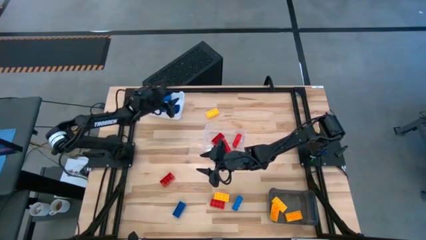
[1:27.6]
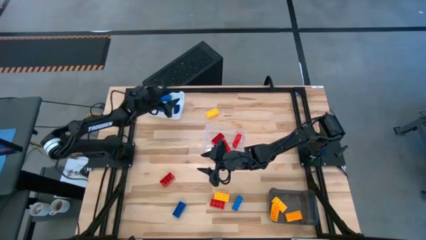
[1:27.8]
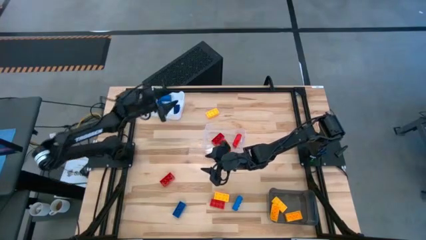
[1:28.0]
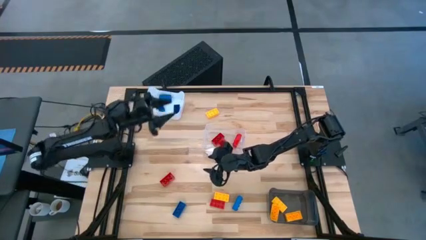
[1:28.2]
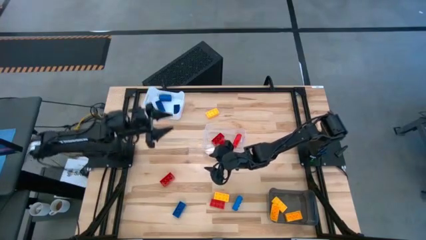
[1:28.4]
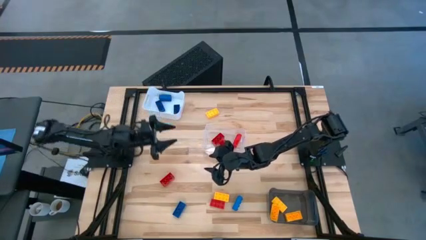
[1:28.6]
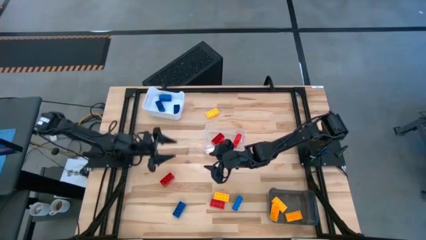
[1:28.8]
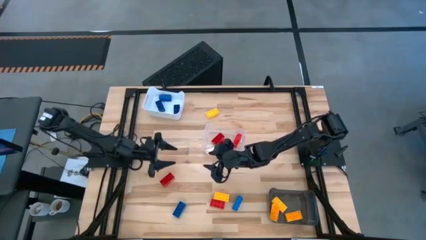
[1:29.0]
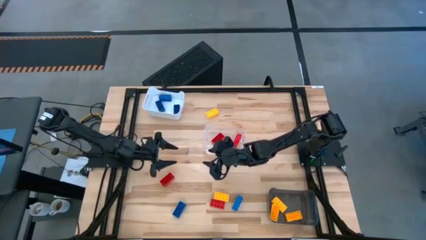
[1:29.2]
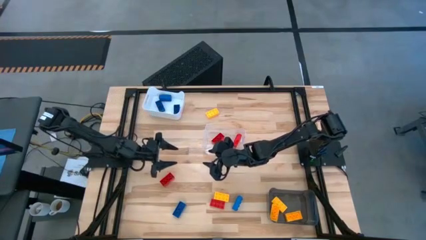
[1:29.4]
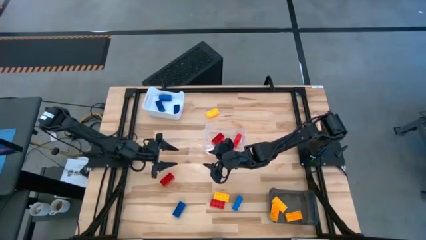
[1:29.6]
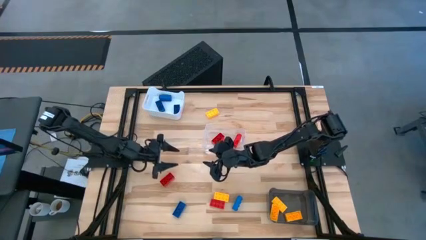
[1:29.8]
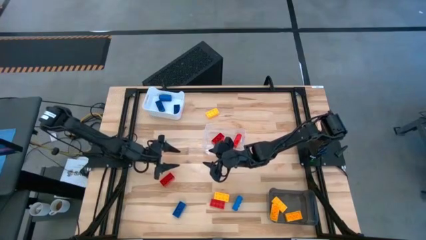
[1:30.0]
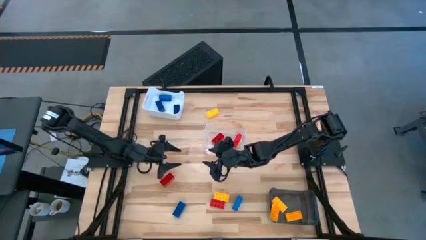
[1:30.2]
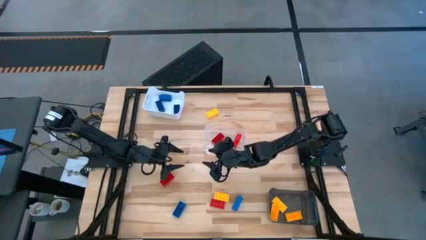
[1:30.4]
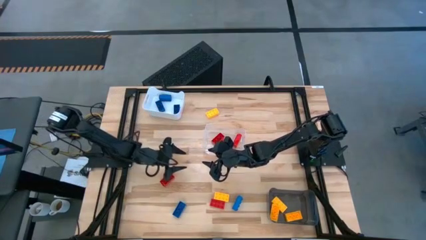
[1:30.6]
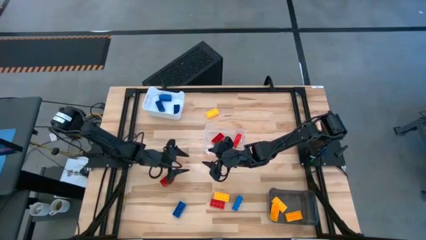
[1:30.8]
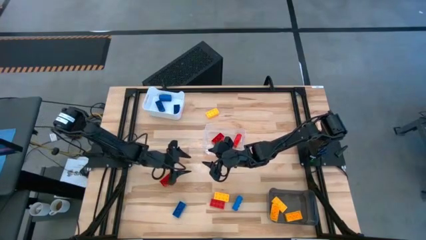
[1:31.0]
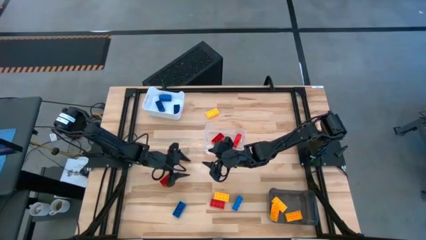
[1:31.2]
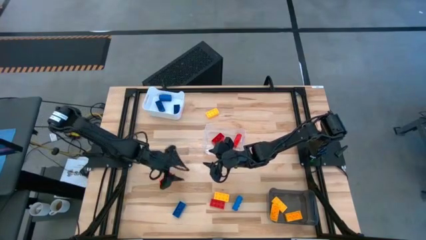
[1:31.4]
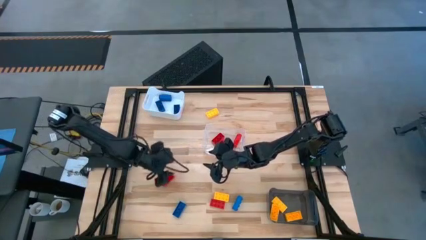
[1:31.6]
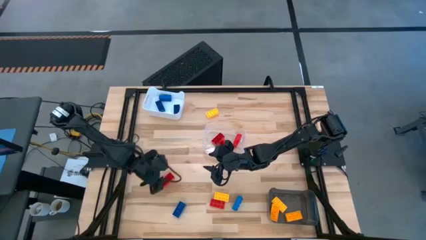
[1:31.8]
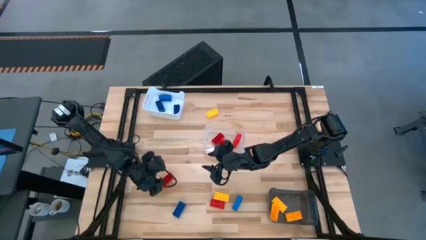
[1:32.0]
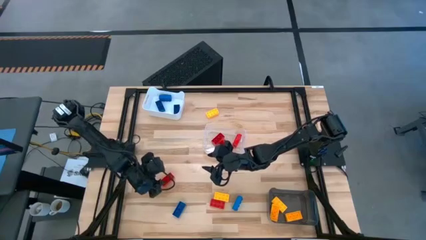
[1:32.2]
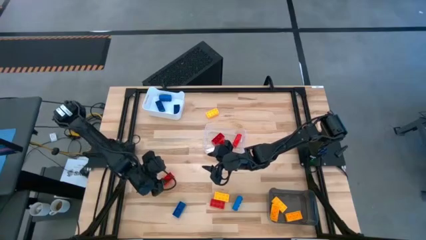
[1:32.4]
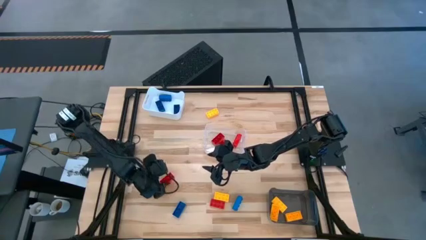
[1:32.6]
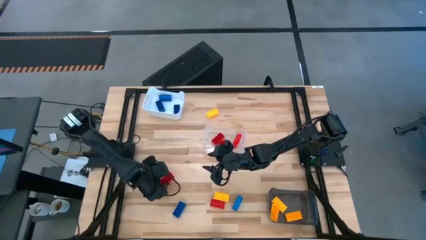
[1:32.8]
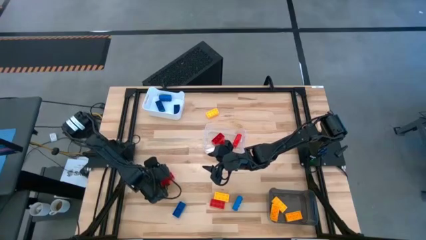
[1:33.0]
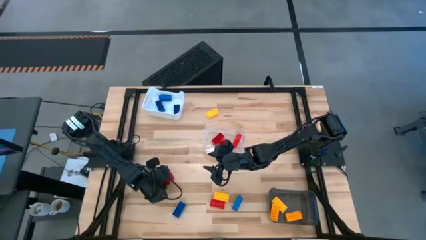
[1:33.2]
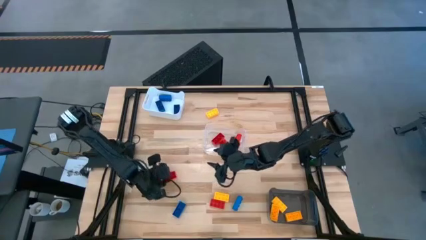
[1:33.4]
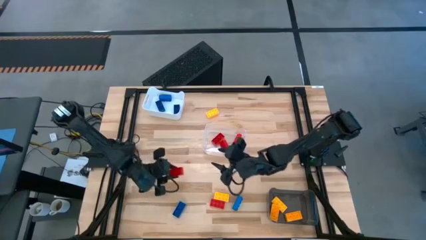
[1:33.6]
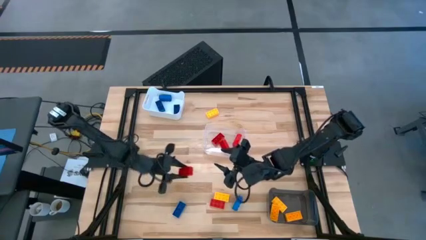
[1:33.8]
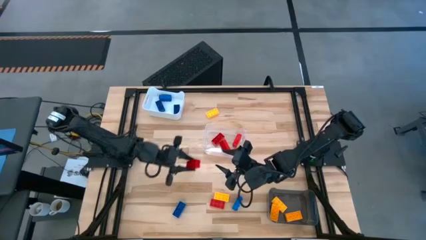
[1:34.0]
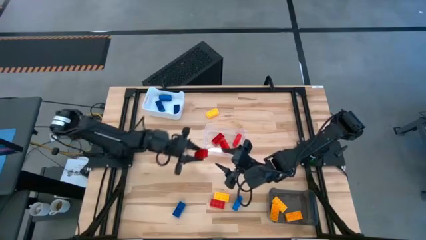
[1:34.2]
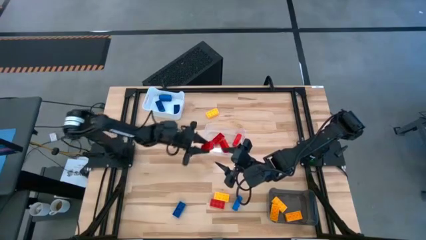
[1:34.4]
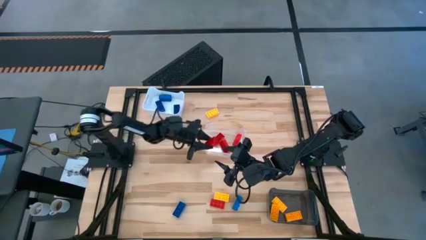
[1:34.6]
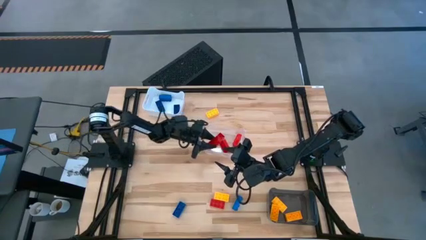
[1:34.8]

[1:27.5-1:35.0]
Task: Sort & place blocks by color
Put the red game piece into the transparent bin

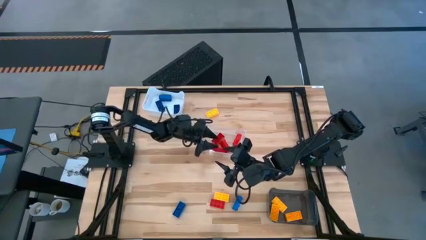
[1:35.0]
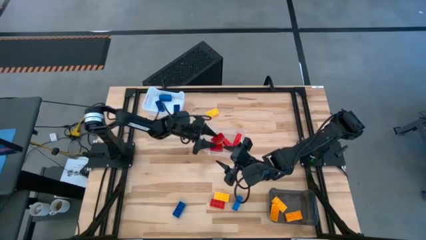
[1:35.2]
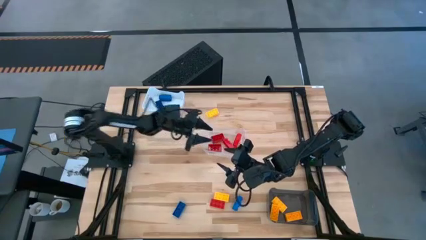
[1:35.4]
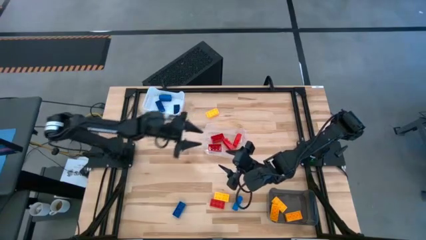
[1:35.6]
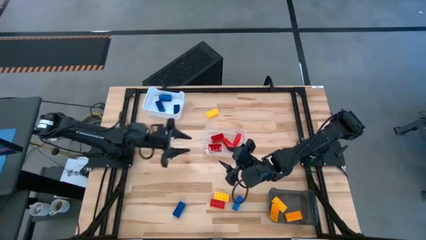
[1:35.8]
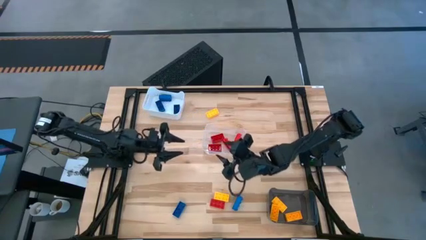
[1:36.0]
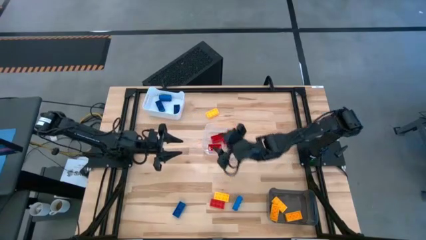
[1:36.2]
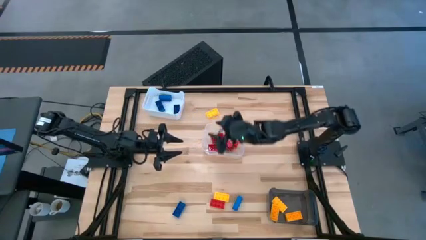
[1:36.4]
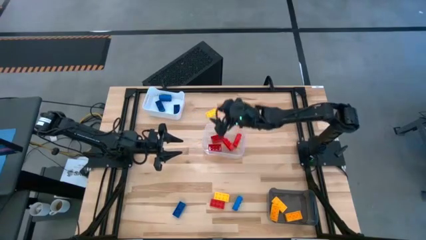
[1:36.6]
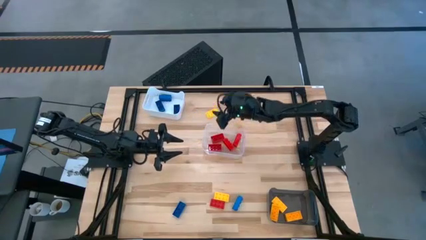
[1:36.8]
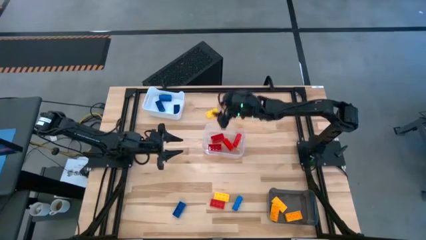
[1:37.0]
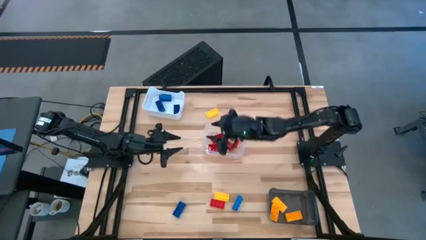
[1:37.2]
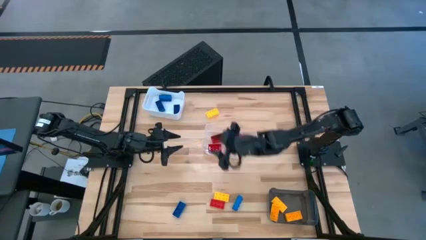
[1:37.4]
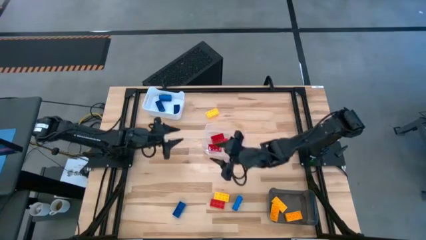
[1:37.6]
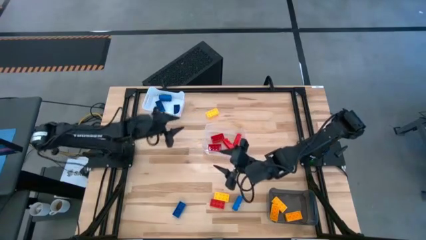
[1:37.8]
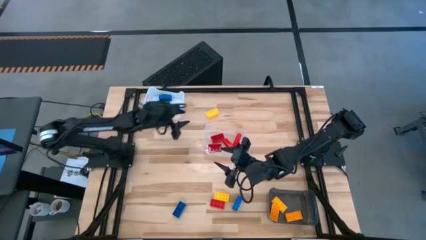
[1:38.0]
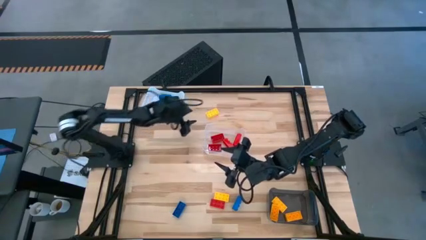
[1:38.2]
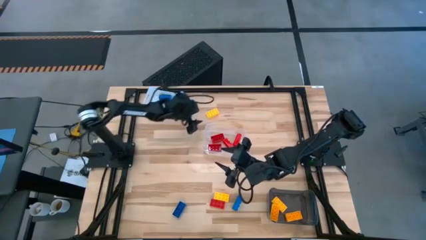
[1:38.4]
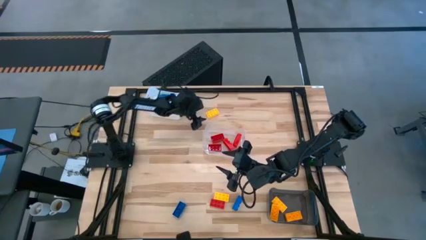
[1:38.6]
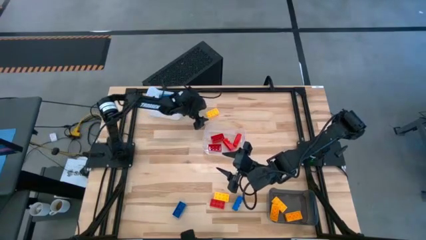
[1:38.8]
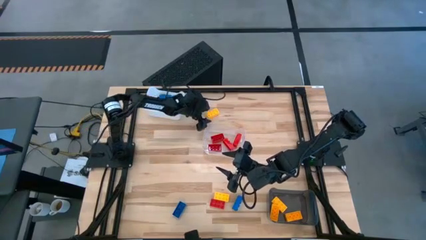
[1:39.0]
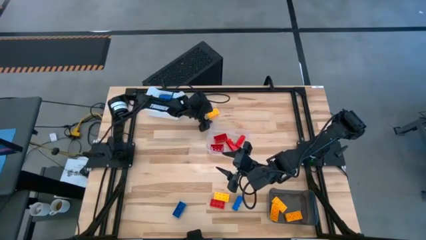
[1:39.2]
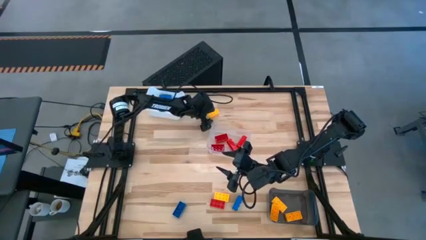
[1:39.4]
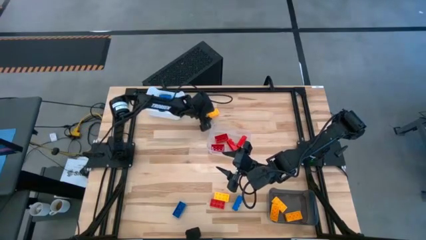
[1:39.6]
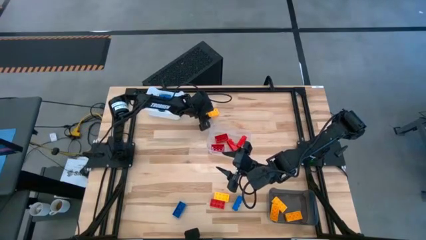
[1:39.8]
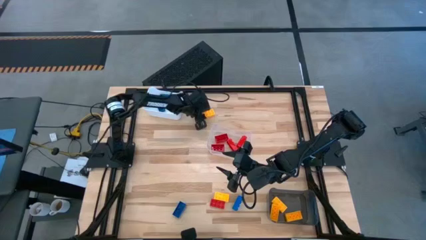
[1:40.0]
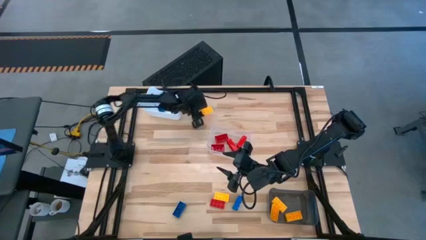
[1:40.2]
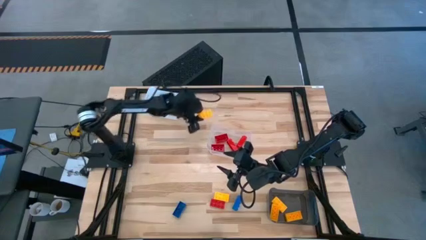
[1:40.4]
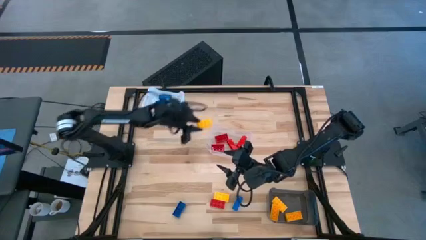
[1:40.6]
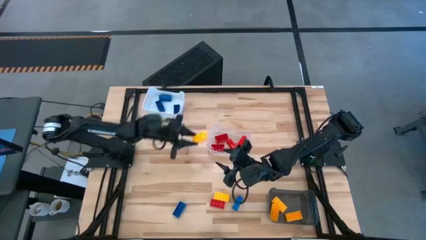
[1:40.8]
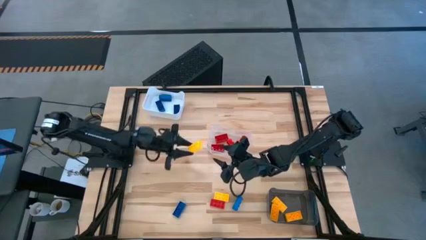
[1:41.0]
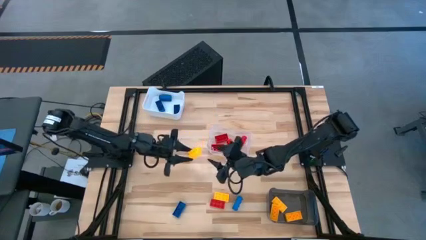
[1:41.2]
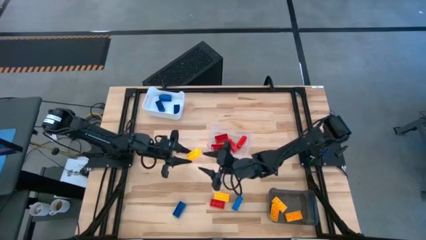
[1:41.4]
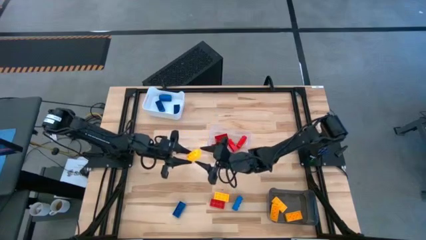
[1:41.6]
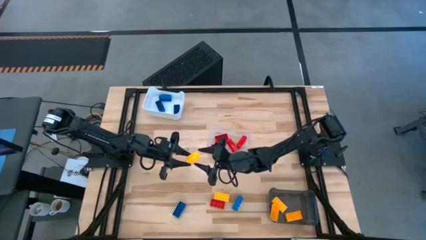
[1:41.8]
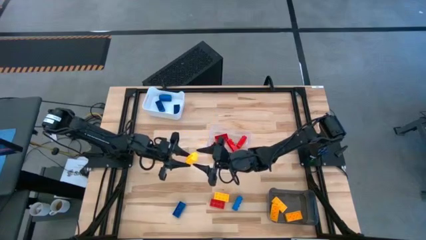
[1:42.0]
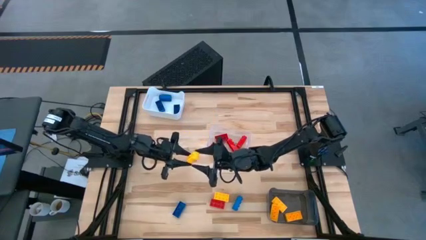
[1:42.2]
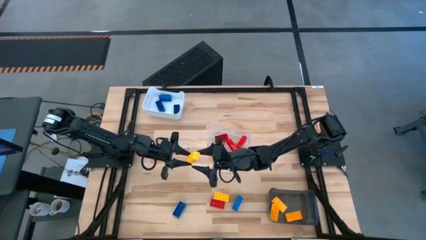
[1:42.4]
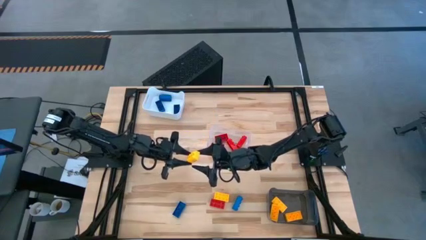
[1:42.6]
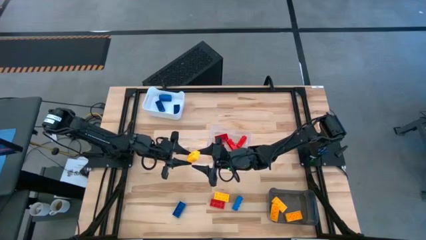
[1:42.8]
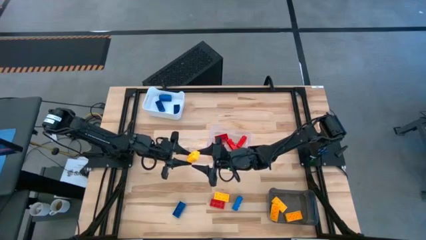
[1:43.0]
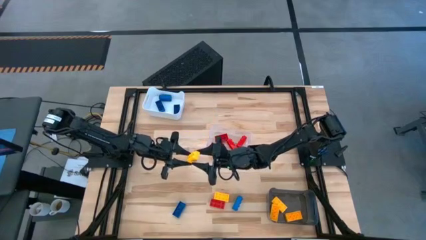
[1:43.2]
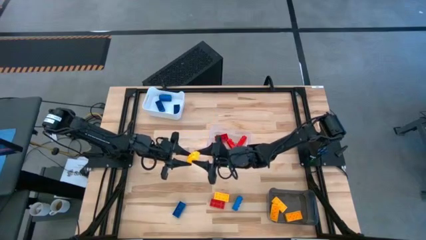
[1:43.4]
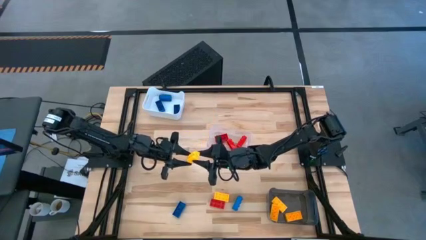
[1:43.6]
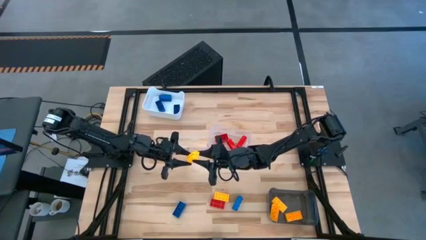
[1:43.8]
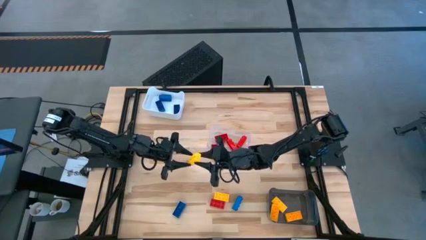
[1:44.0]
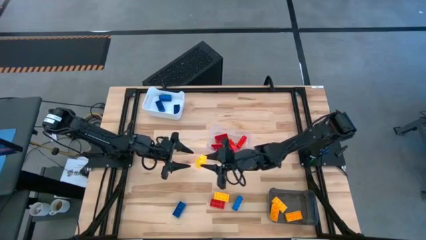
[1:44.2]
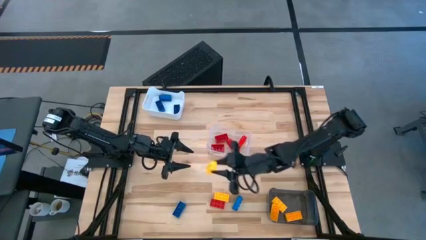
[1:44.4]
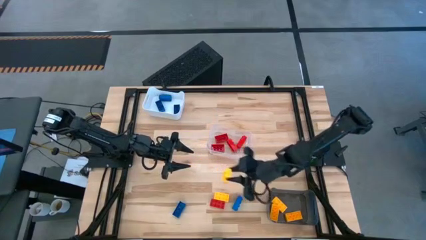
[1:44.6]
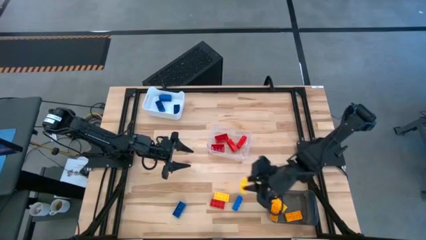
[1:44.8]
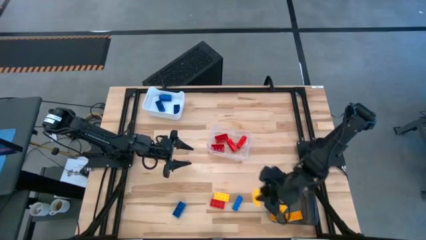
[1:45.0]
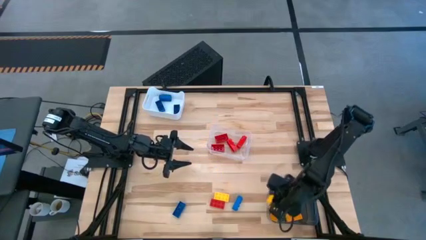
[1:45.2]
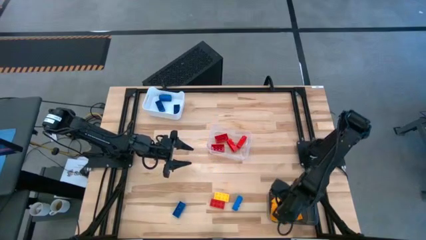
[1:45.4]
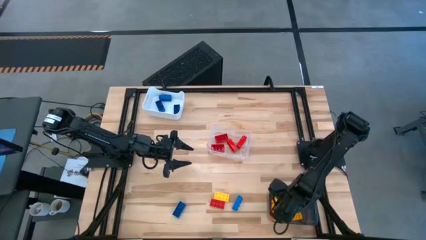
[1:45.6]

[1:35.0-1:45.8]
Put the yellow game piece into the black bin
